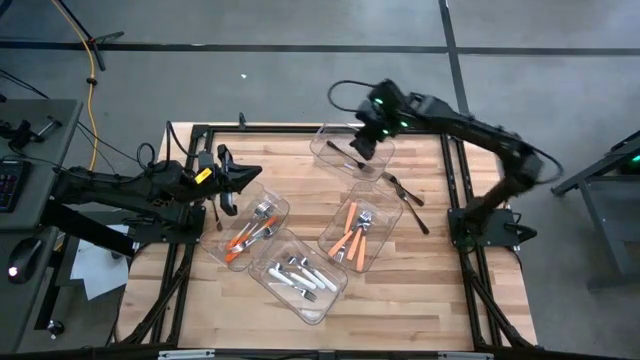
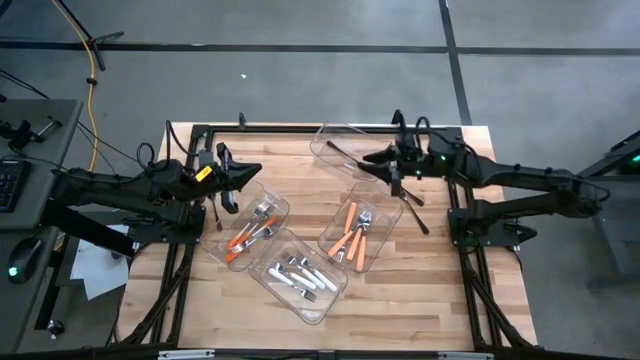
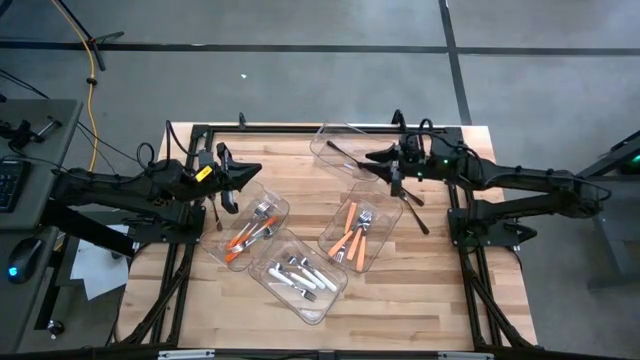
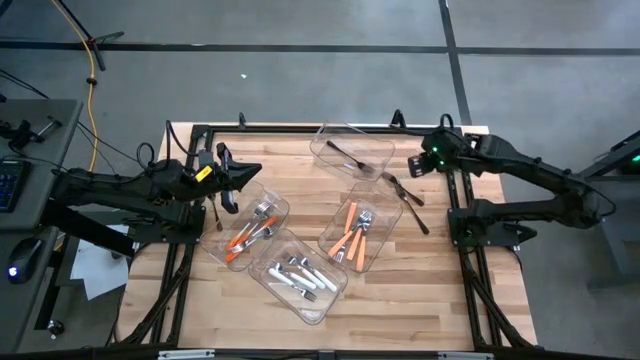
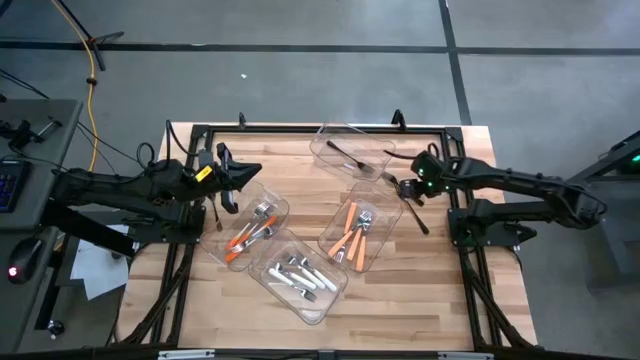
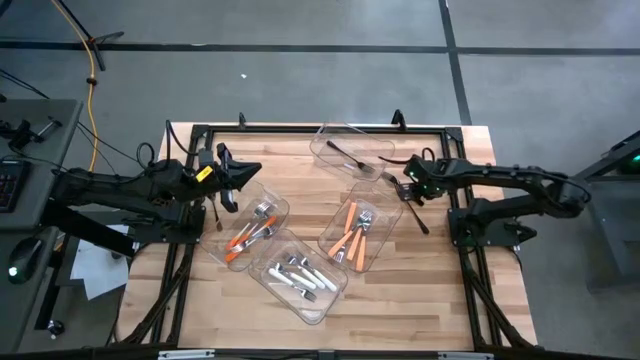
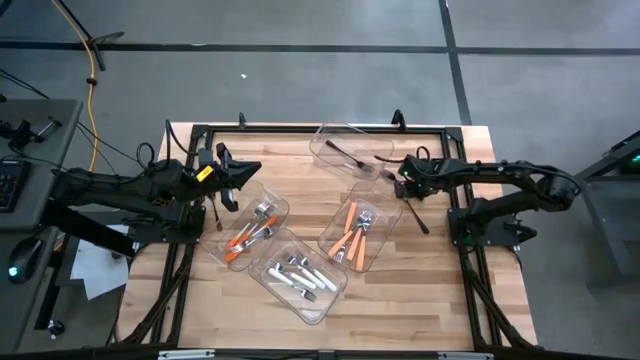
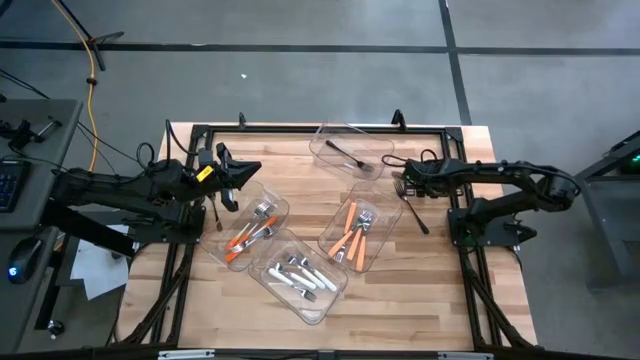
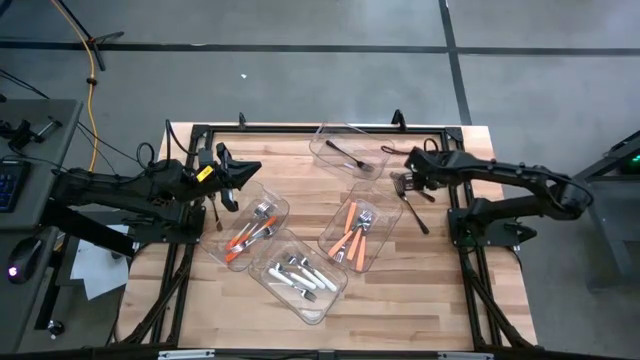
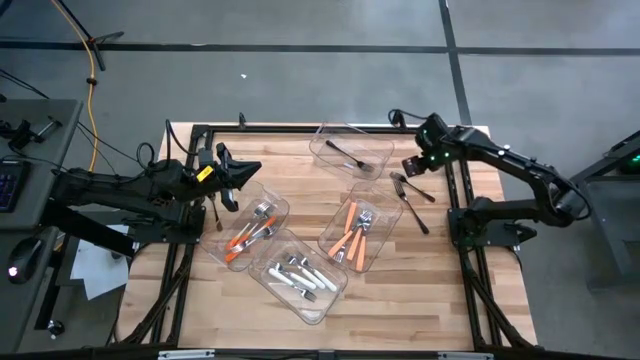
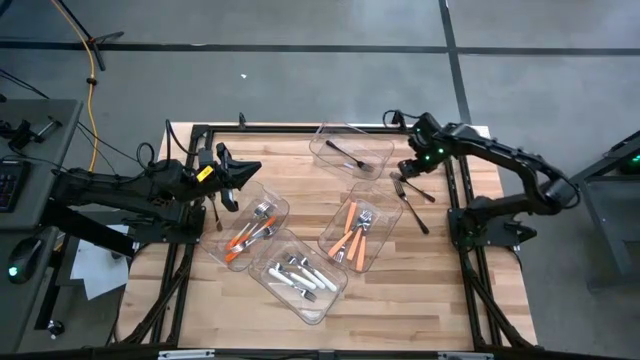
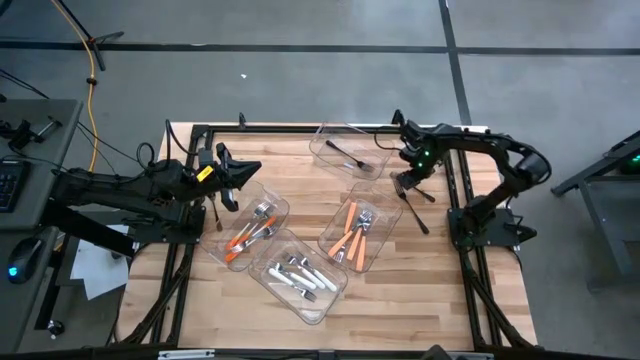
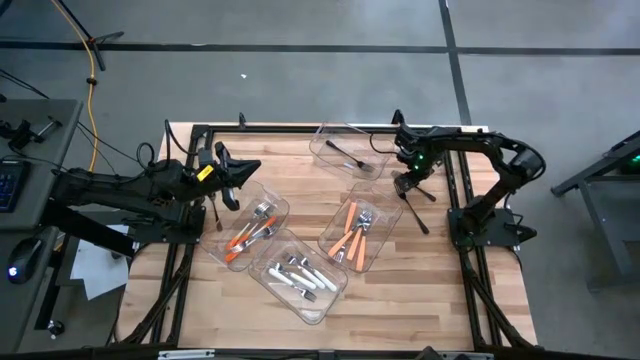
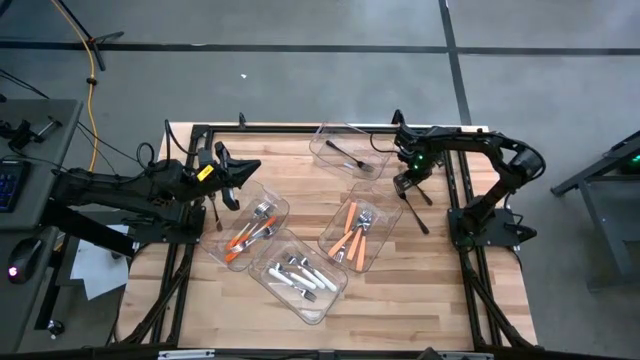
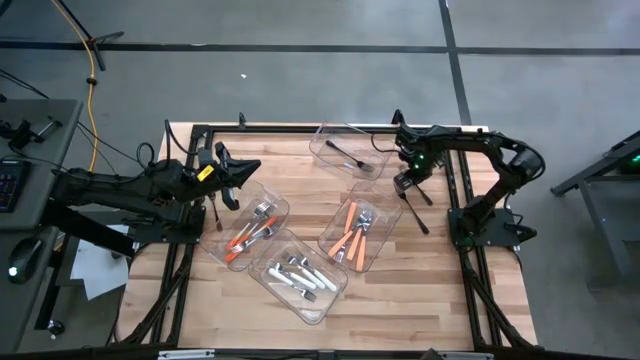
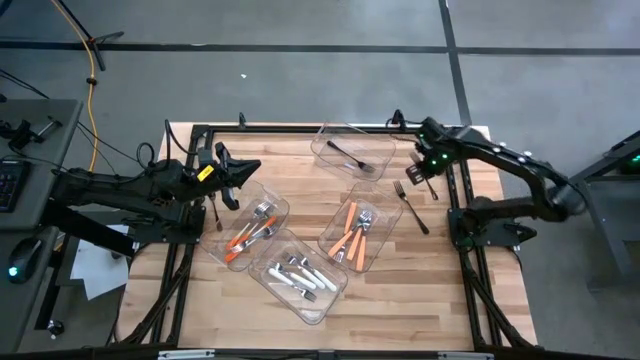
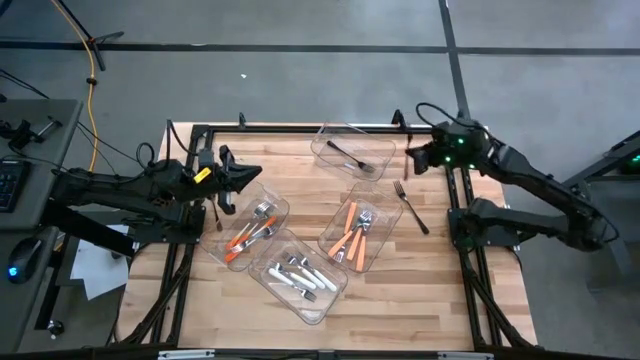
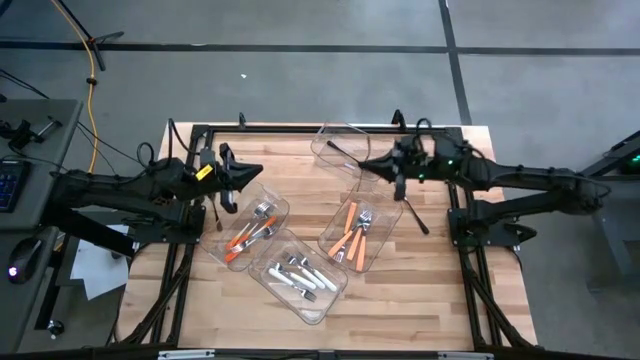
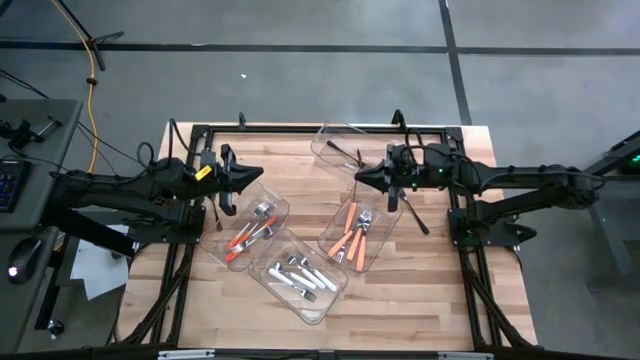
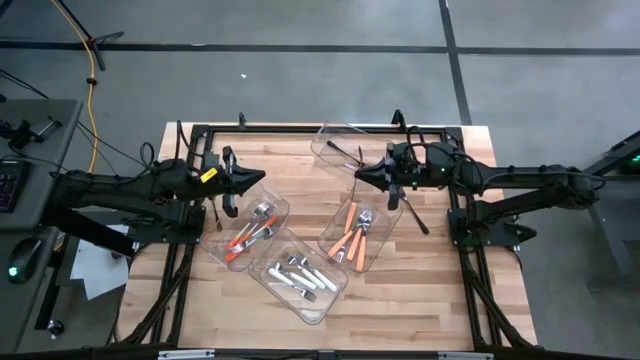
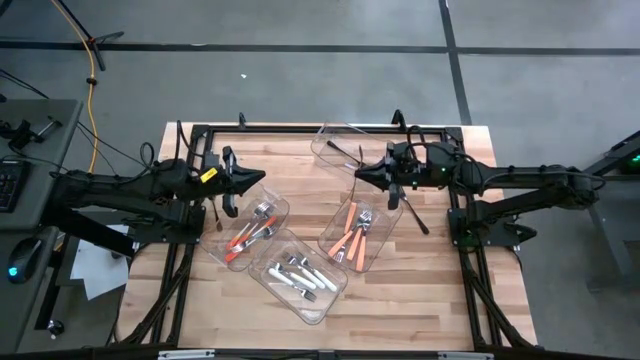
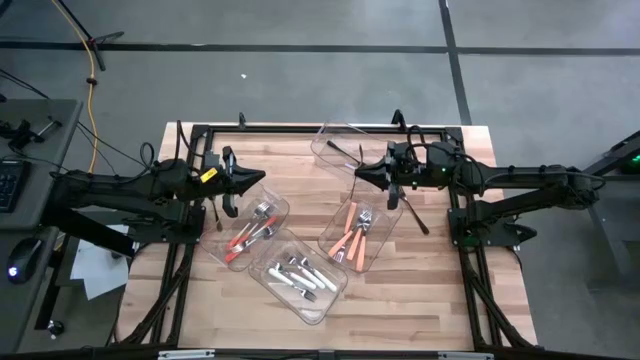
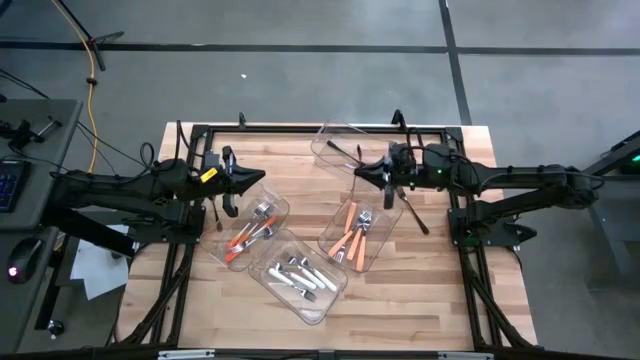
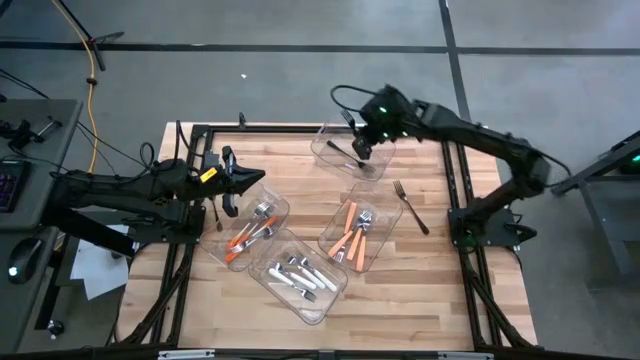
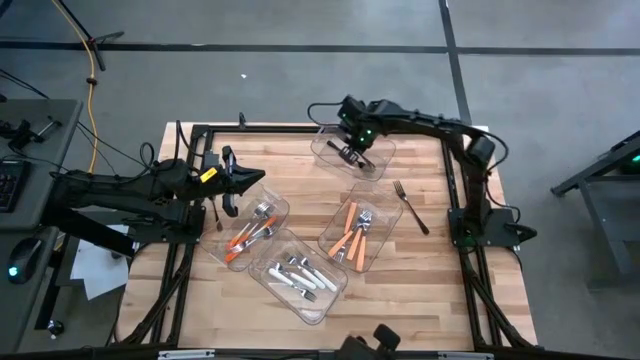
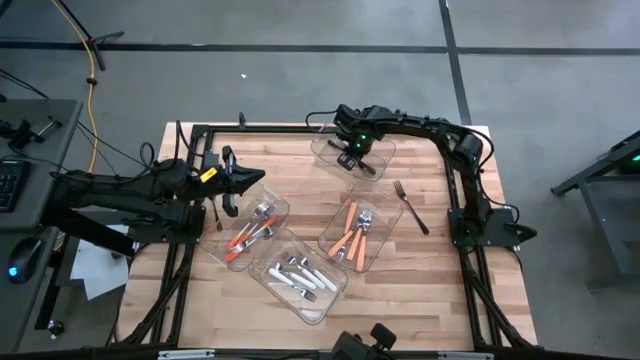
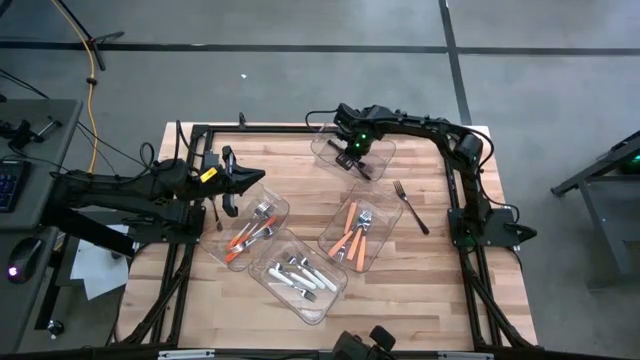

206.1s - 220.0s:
Task: Sort silverware by color (type)
Put the black fork into the top transparent bin

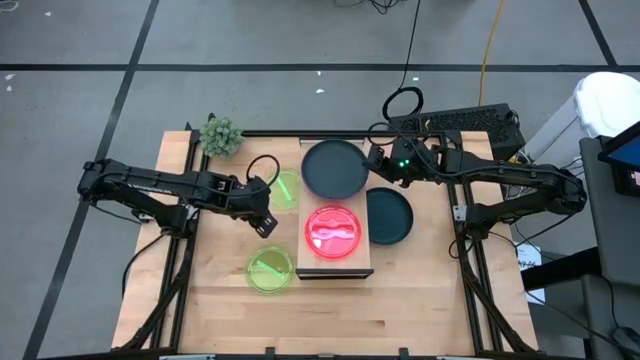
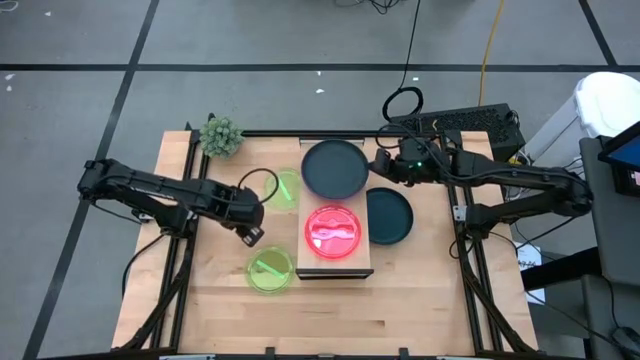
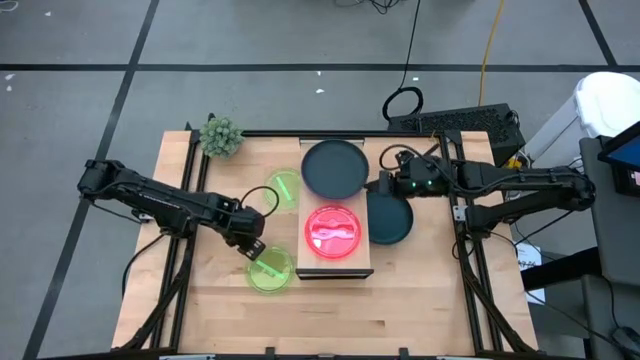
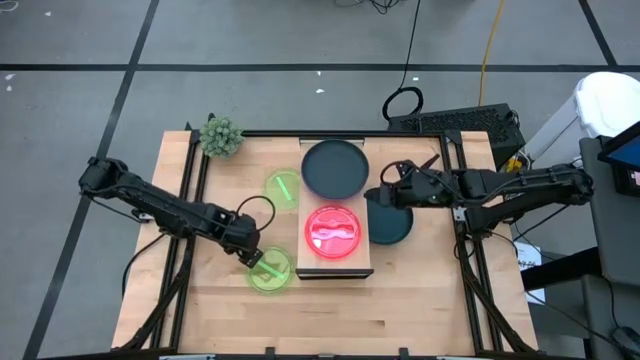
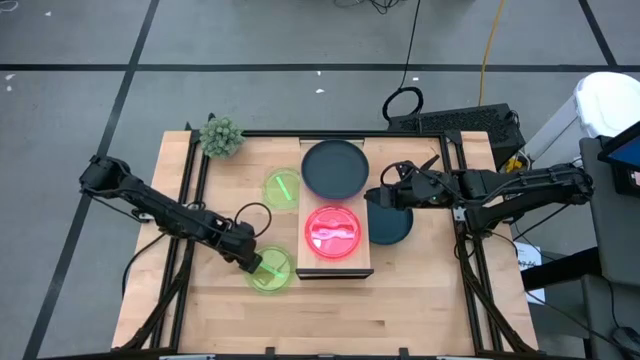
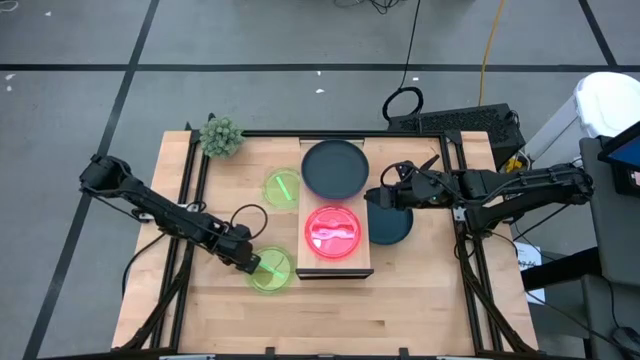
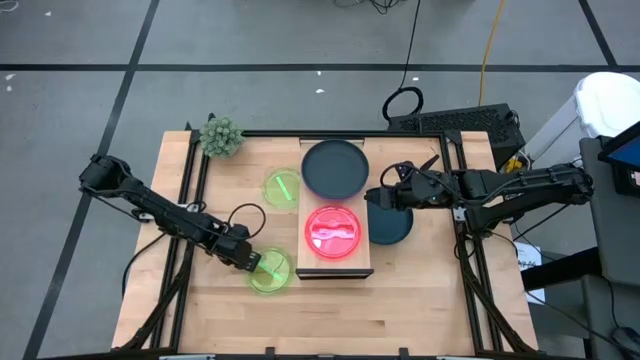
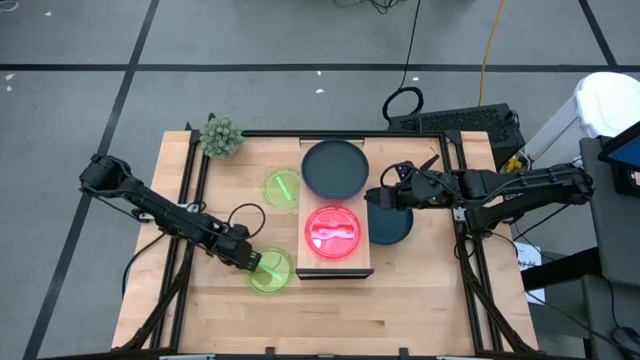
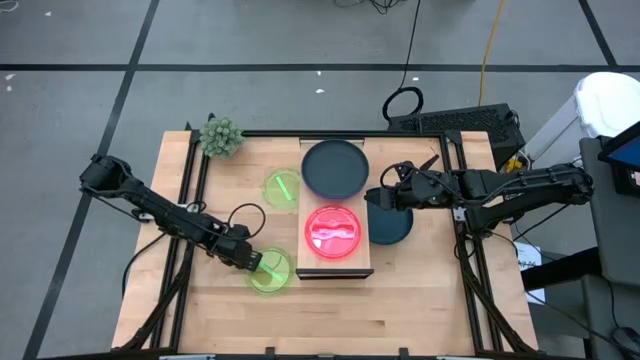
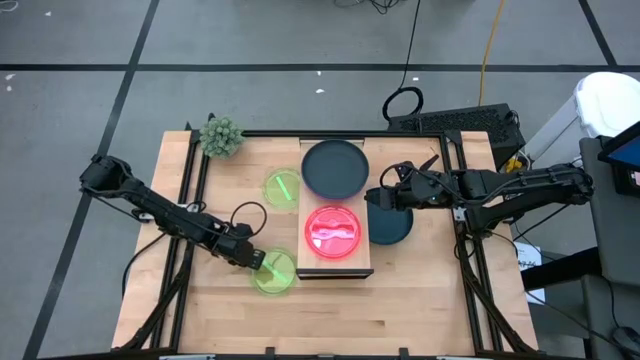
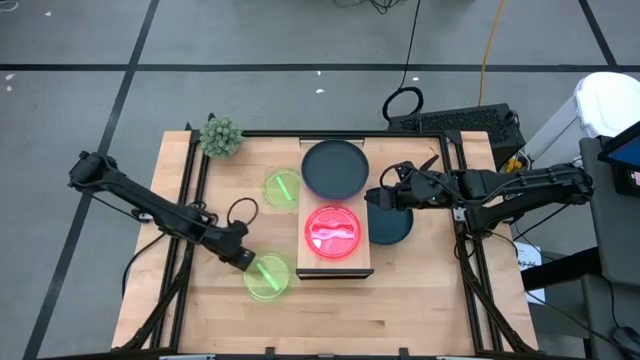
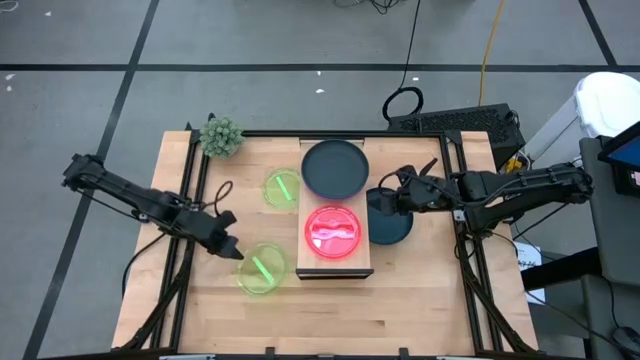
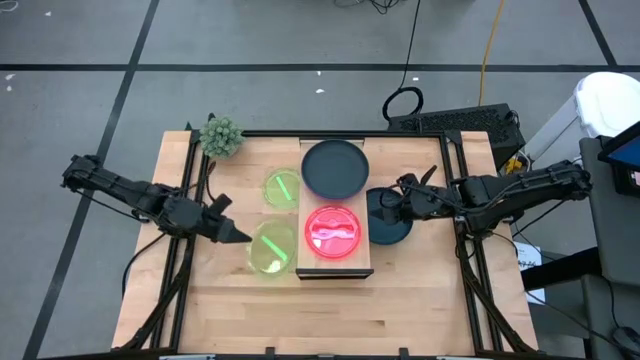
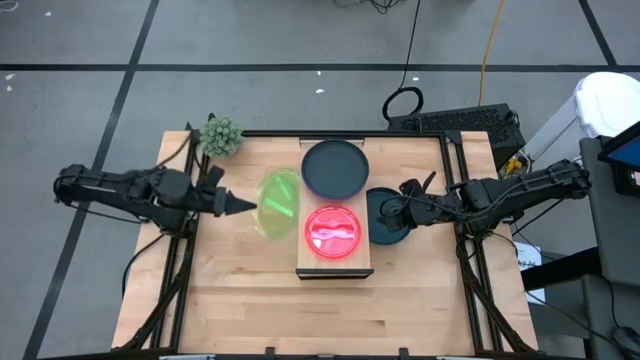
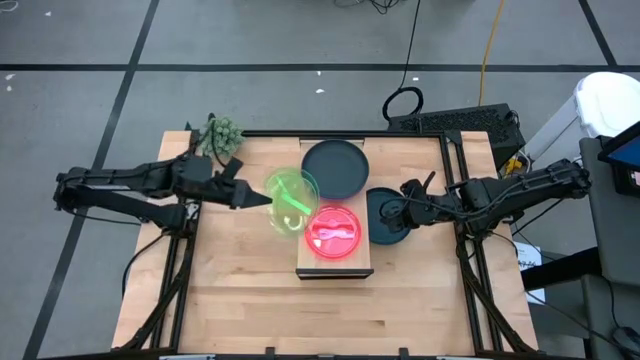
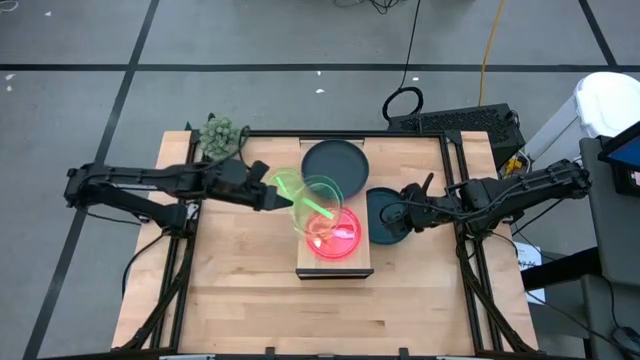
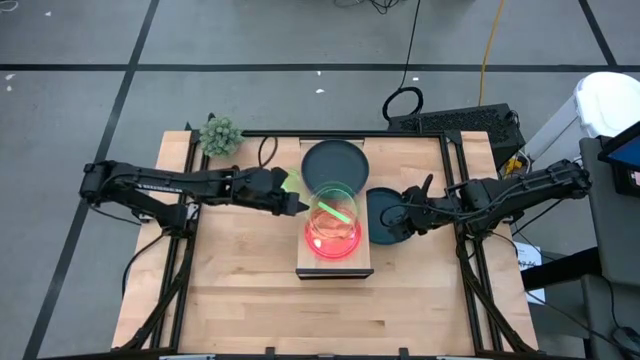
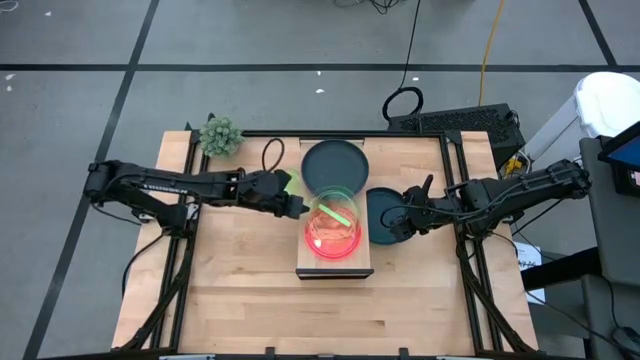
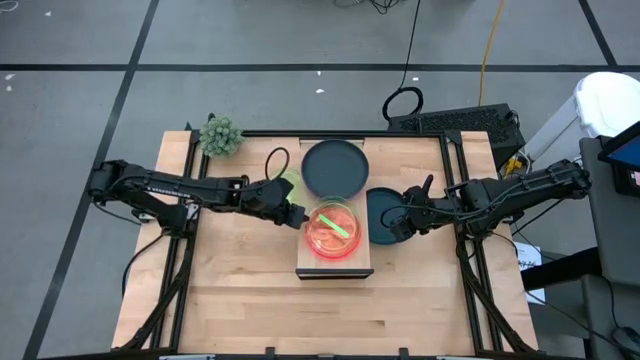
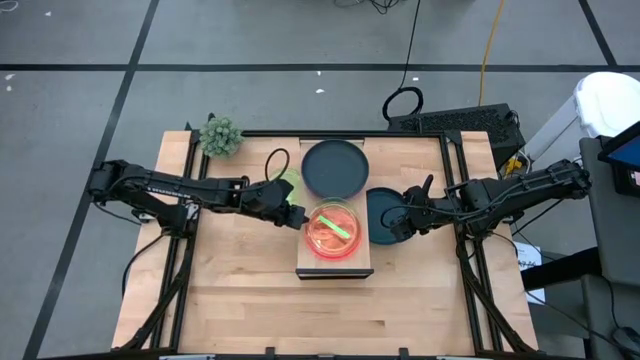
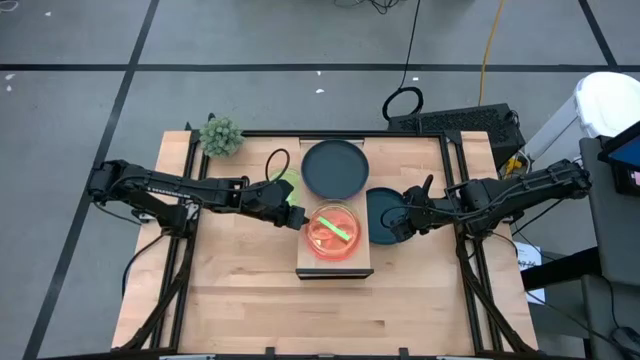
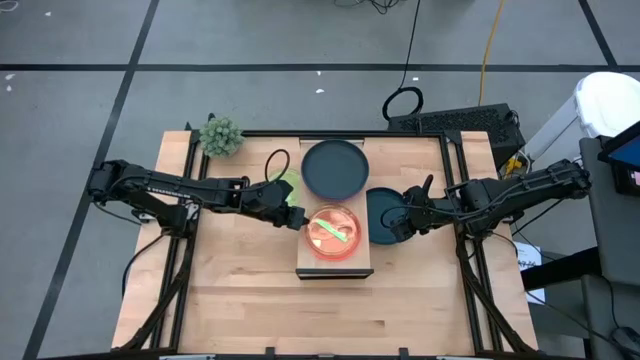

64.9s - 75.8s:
Task: Place and stack plates onto a shelf
Stack the bottom green plate on top of the pink plate on the shelf
